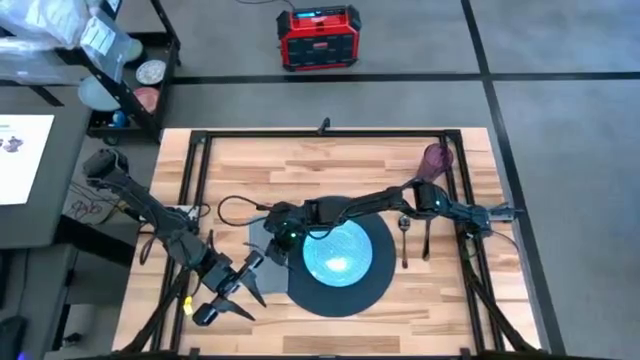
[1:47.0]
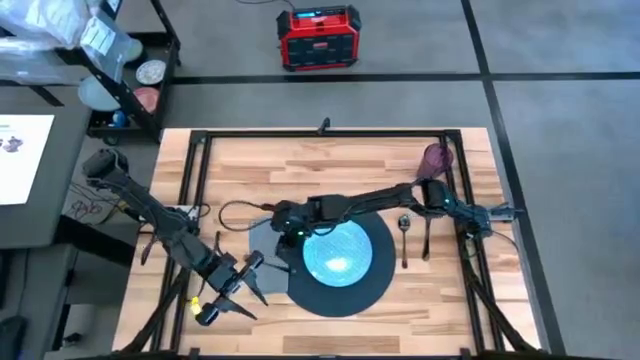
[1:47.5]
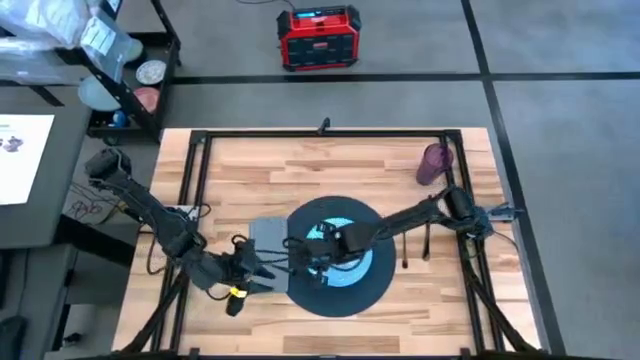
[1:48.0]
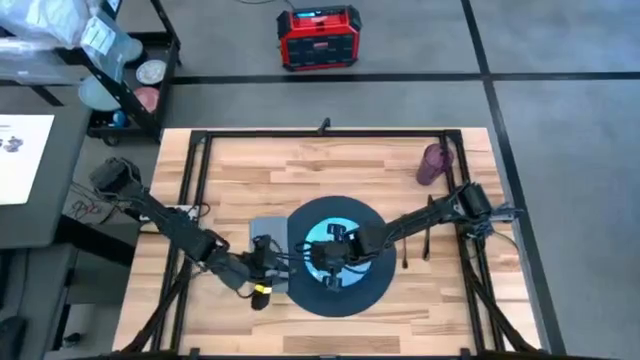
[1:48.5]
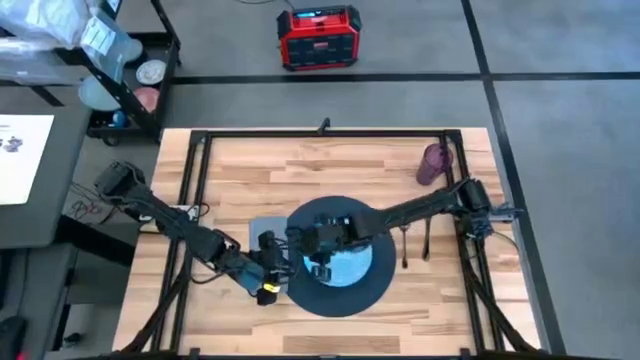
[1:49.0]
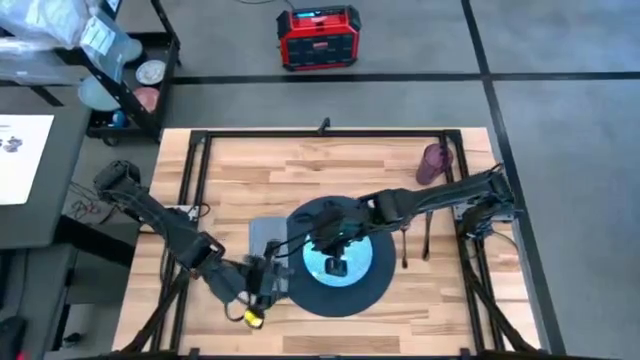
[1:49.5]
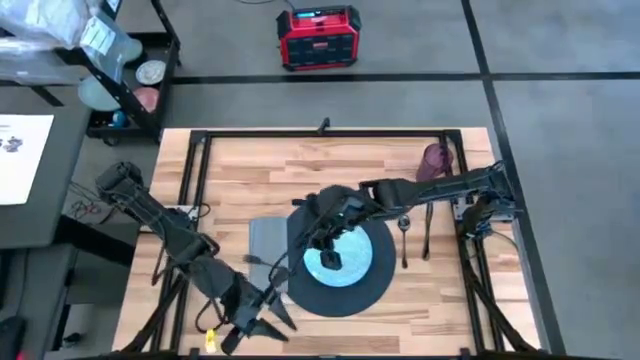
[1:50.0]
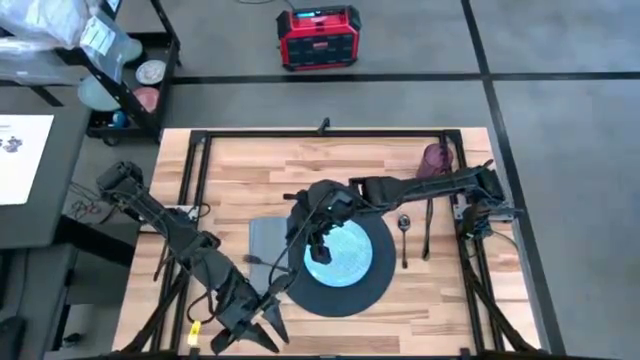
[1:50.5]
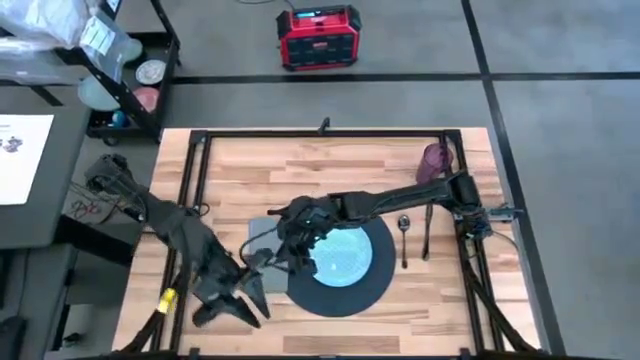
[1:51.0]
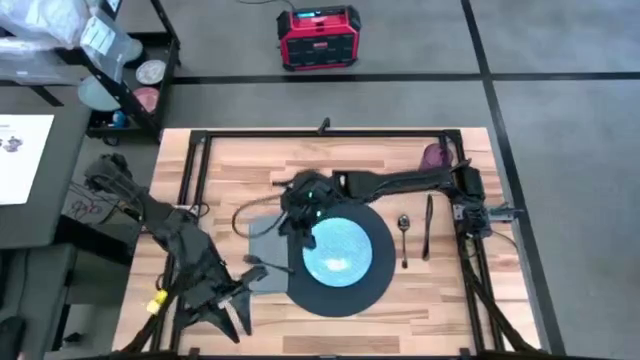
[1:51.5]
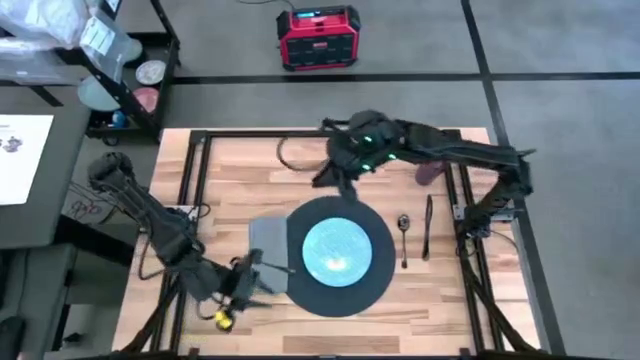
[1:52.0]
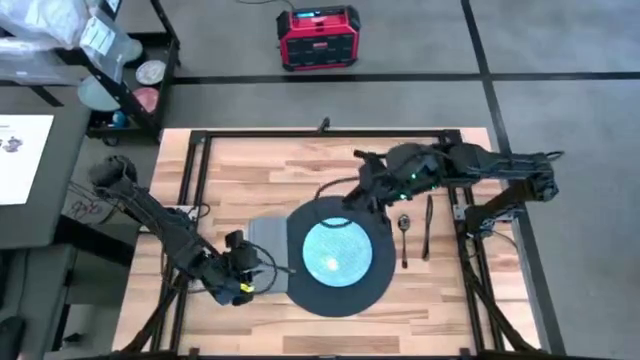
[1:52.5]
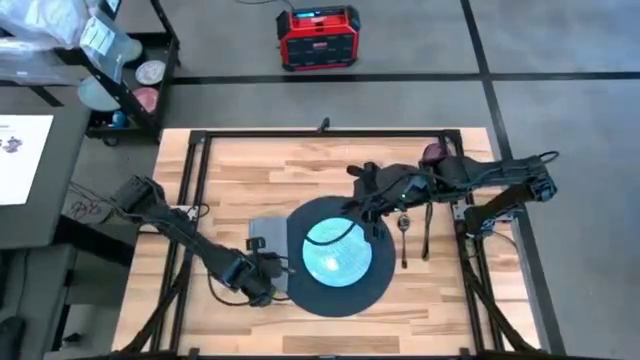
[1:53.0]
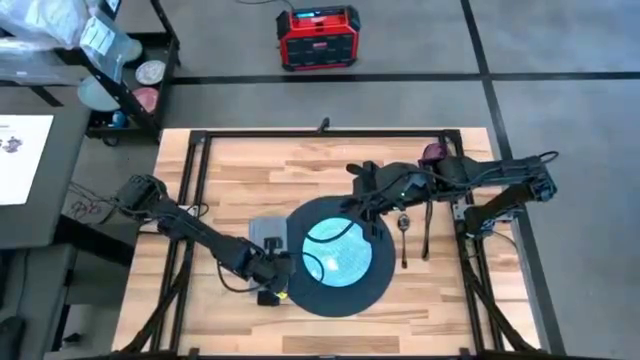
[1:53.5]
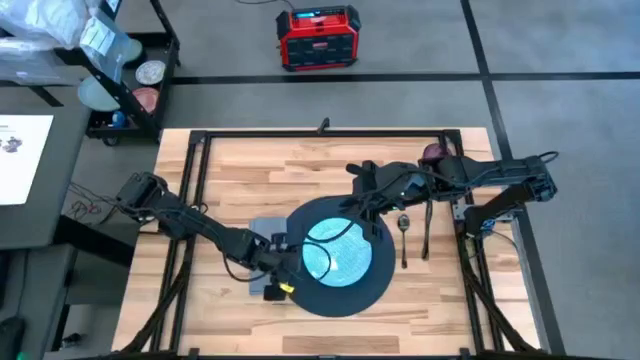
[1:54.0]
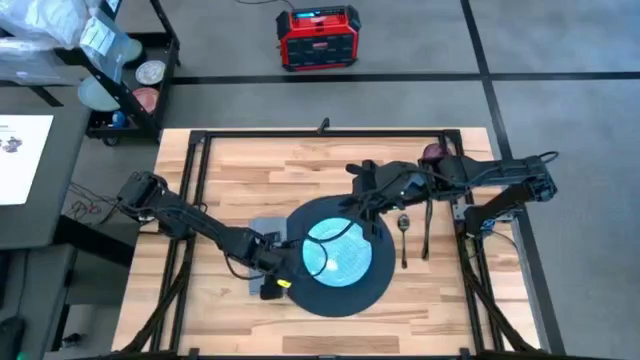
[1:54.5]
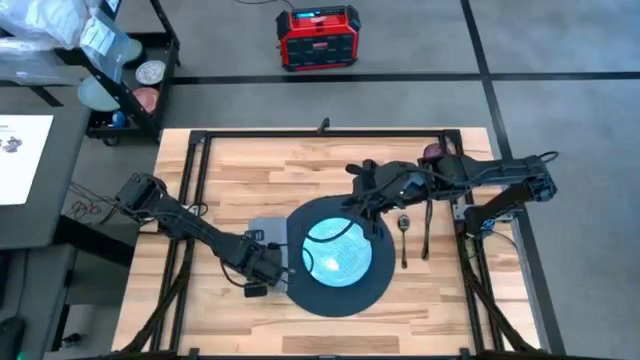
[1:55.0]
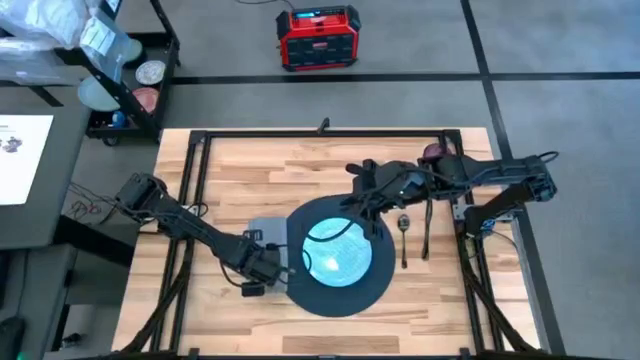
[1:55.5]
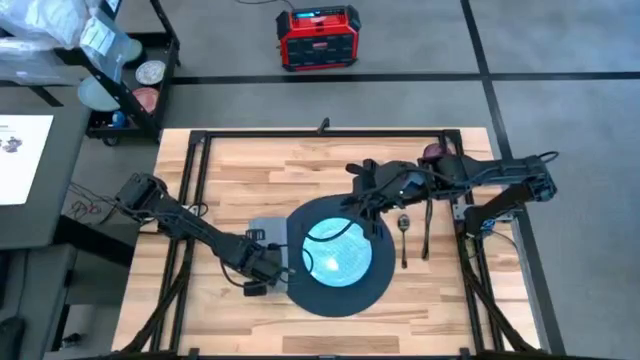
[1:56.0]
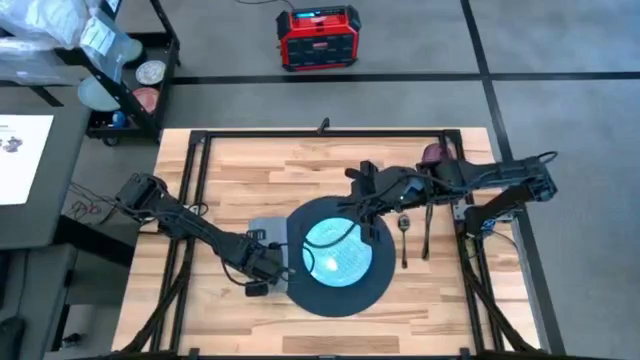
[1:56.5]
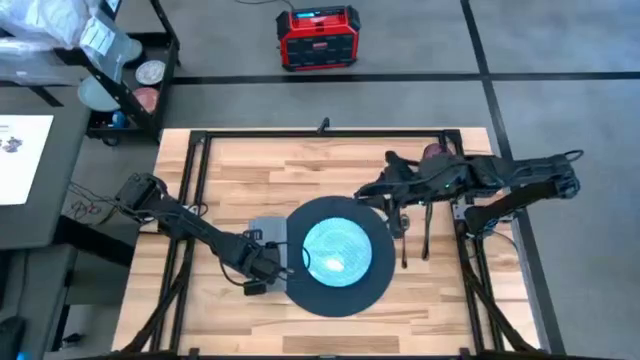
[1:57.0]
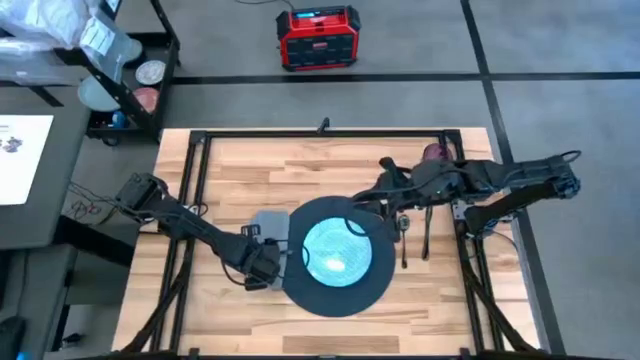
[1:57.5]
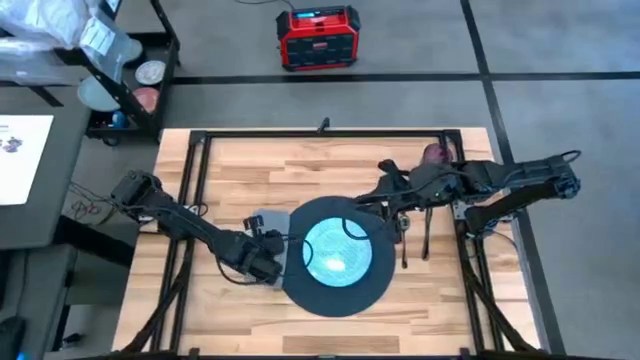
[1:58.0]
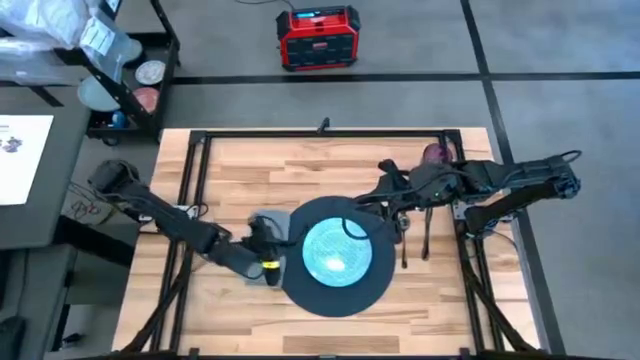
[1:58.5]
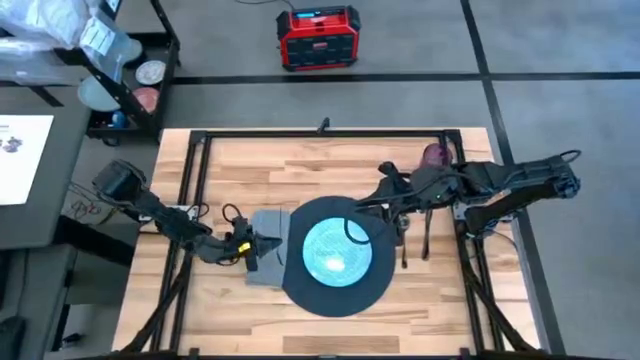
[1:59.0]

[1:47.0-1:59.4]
Task: Set table place
Adjust the black fork on the gray table napkin

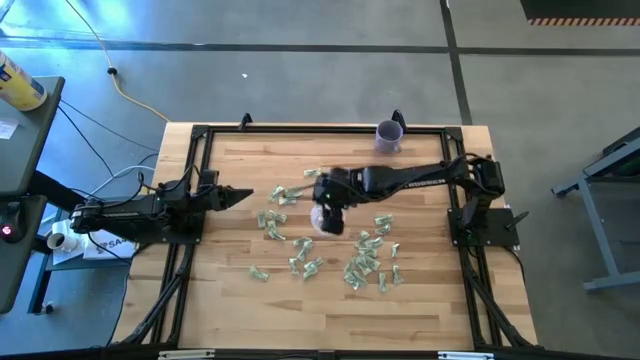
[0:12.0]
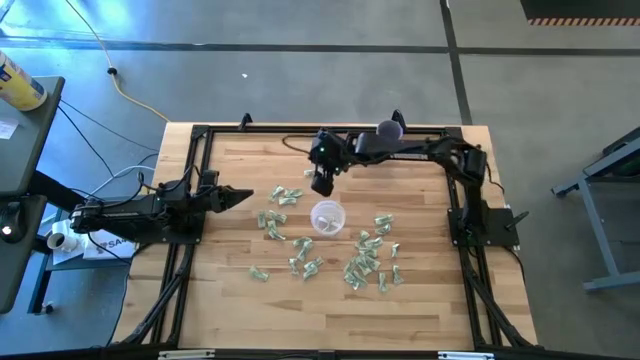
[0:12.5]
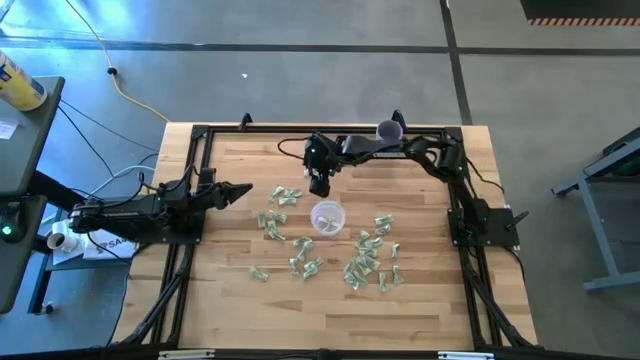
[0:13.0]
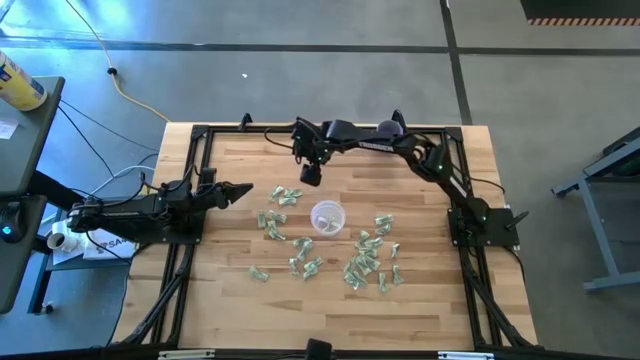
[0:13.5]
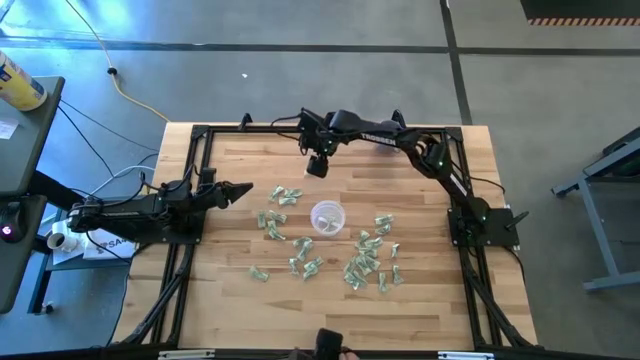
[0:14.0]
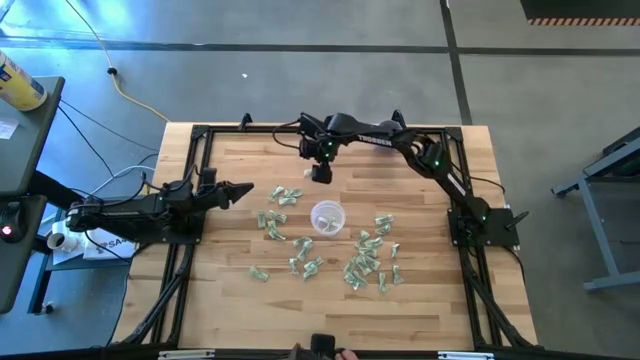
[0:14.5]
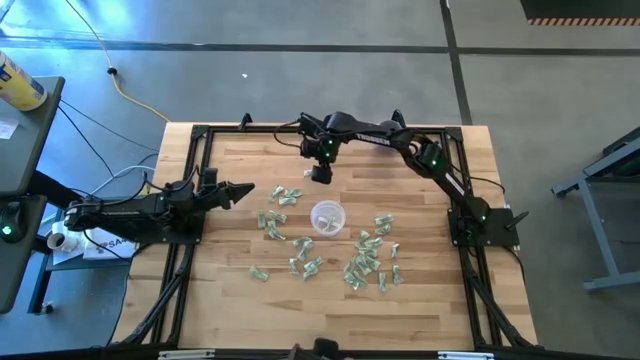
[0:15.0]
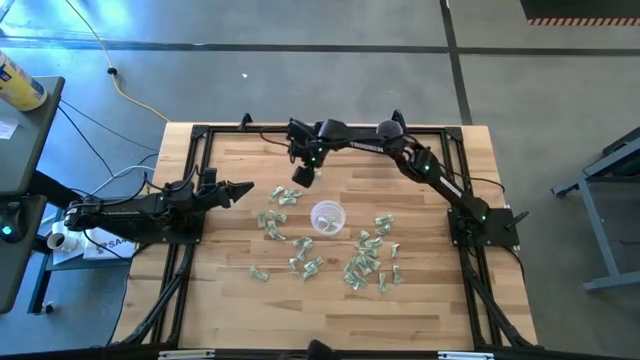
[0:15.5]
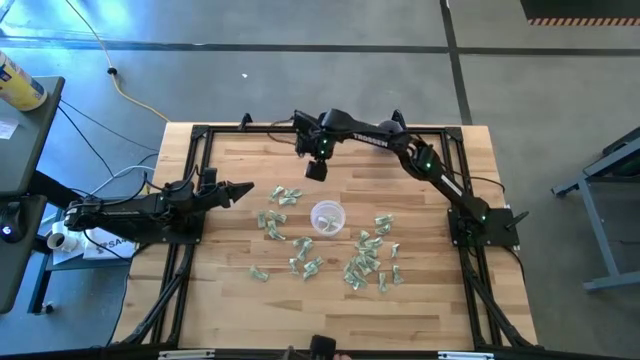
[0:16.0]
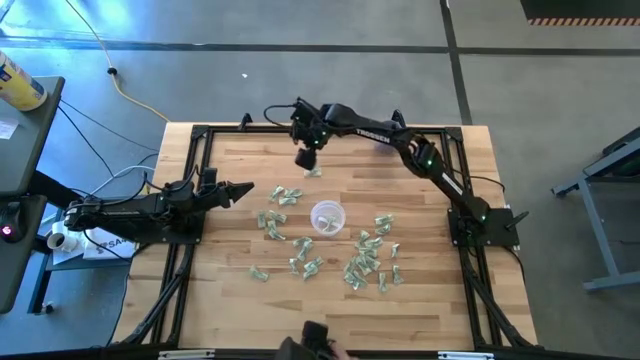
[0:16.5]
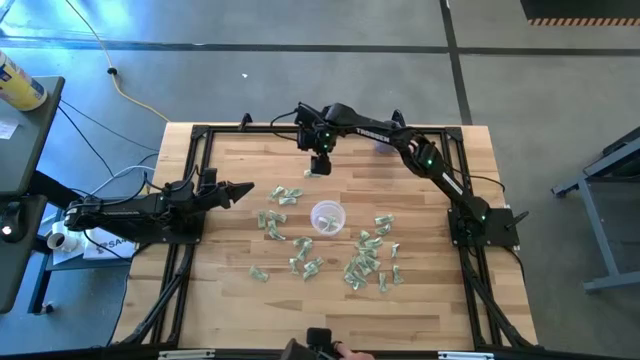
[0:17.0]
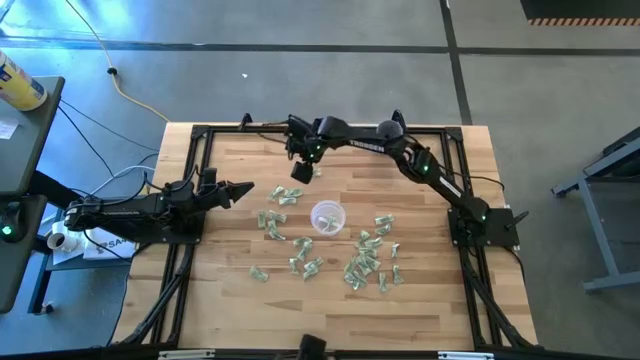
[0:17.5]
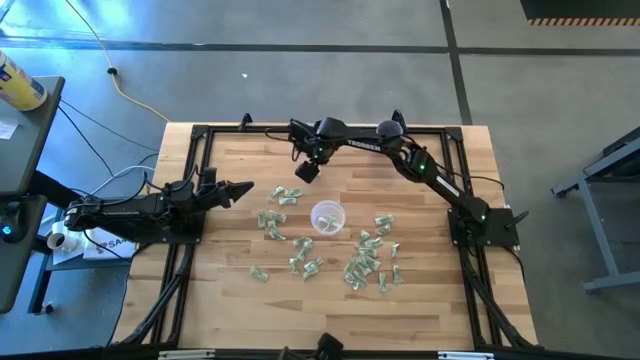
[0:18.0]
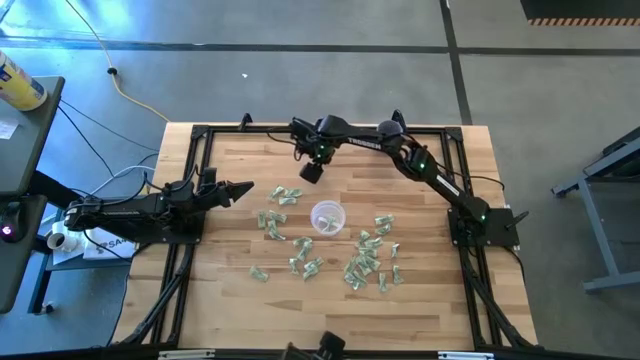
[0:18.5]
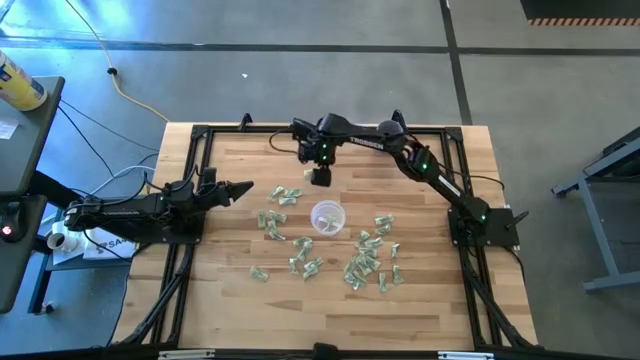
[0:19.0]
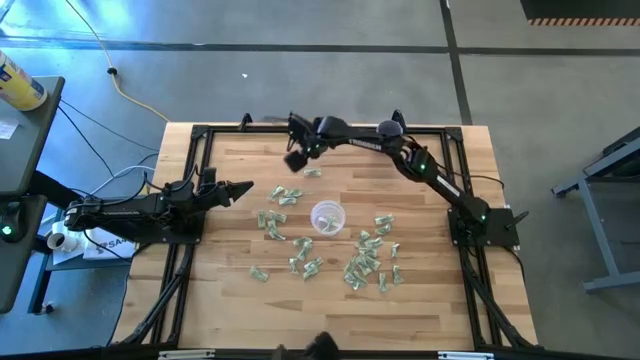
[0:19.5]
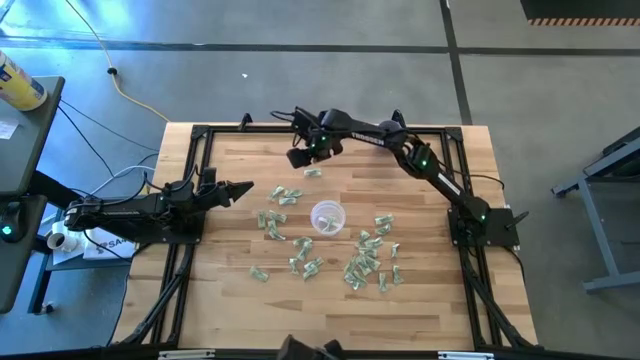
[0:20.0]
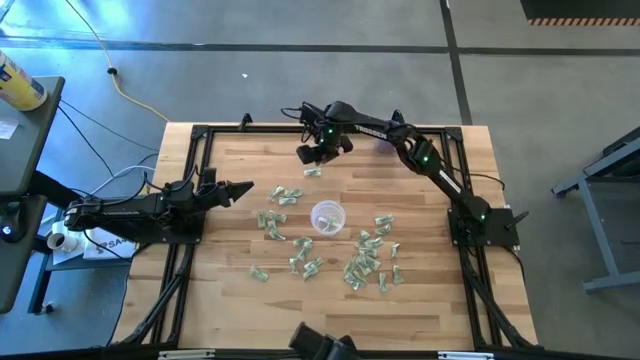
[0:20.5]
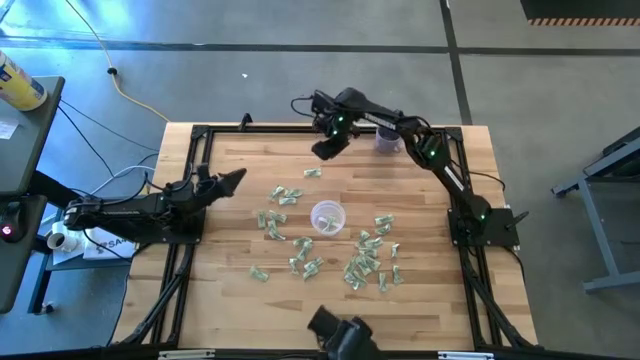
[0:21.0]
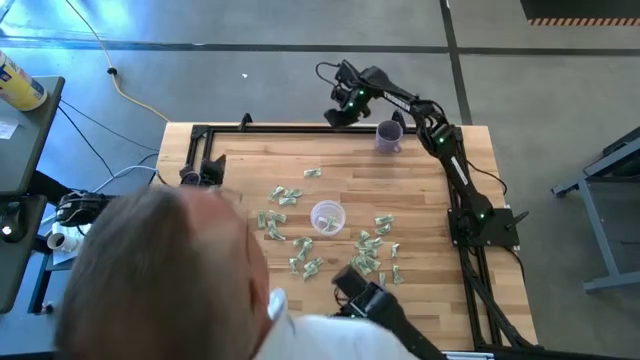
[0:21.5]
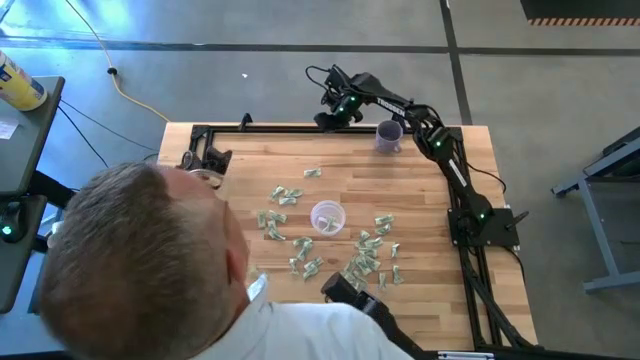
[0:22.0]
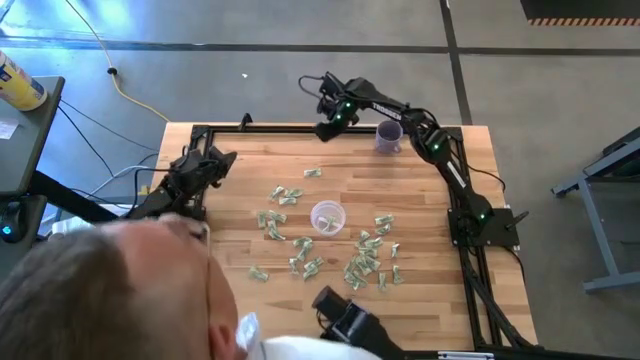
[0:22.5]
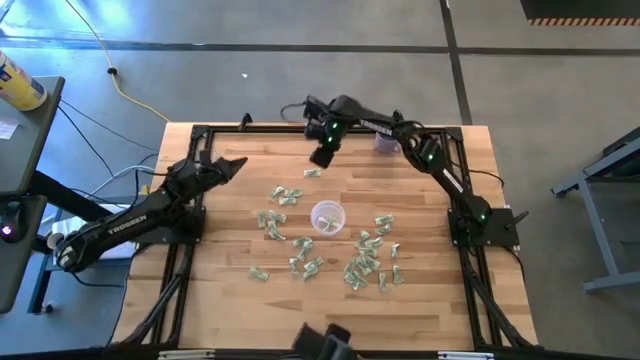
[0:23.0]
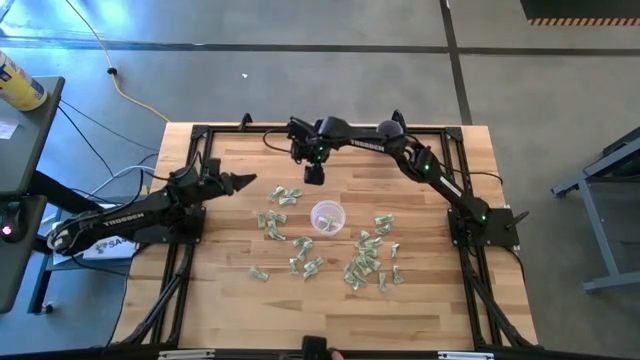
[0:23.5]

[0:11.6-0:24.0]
Task: Pick and place Stevia / Truvia into bins
Put the green stevia packet into the transparent bin
